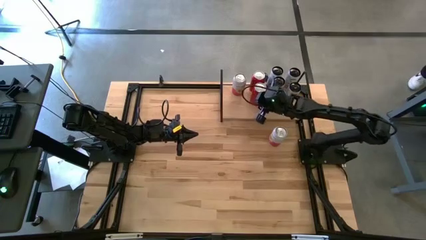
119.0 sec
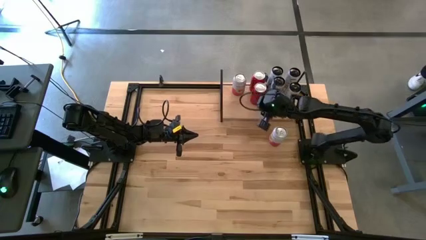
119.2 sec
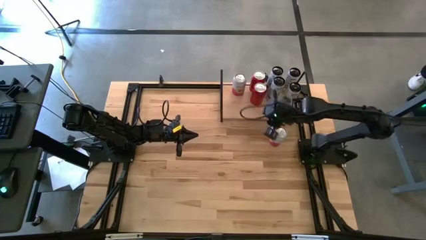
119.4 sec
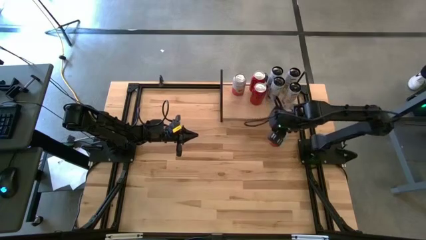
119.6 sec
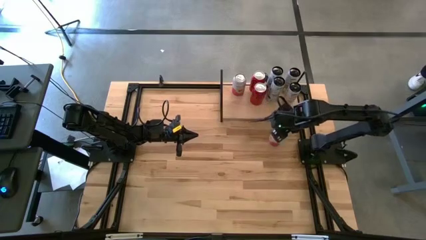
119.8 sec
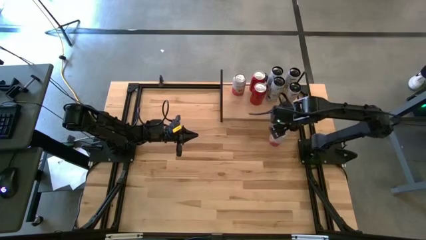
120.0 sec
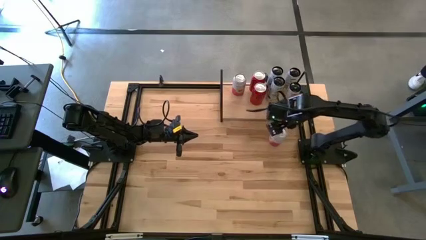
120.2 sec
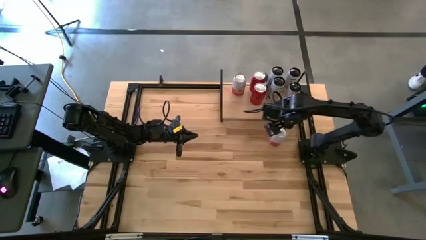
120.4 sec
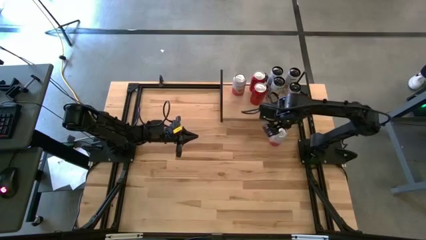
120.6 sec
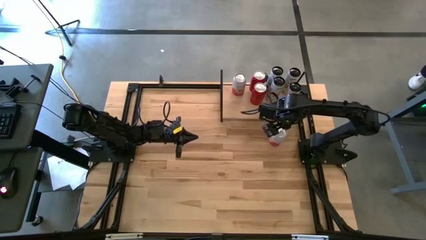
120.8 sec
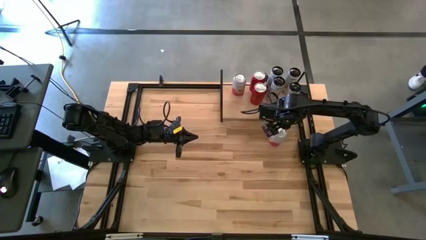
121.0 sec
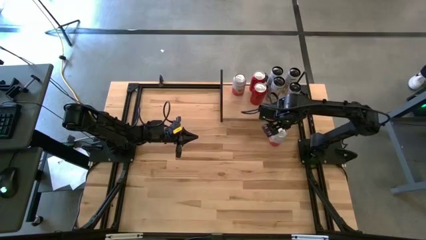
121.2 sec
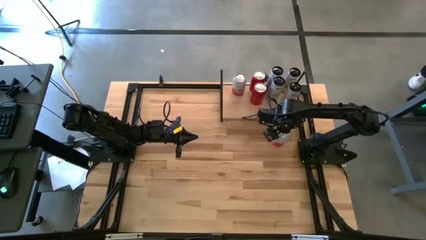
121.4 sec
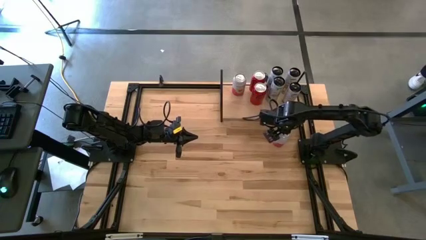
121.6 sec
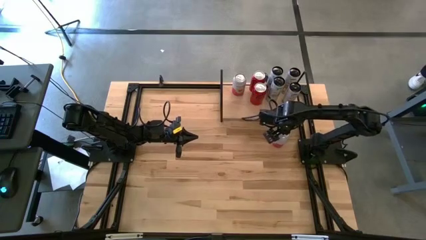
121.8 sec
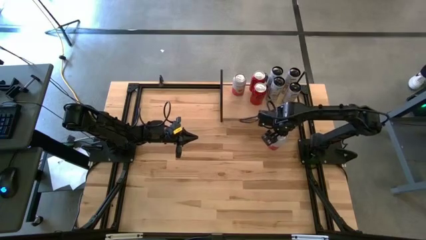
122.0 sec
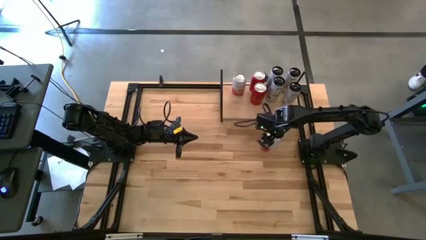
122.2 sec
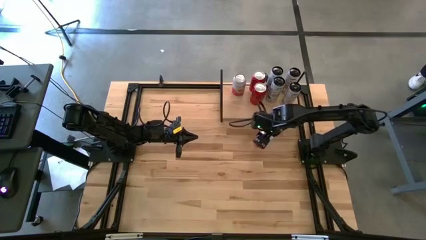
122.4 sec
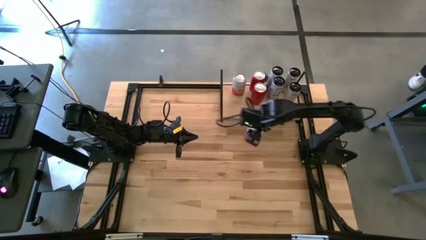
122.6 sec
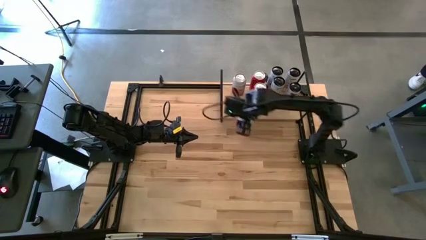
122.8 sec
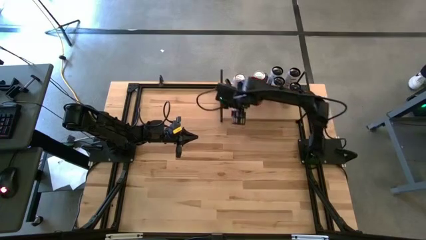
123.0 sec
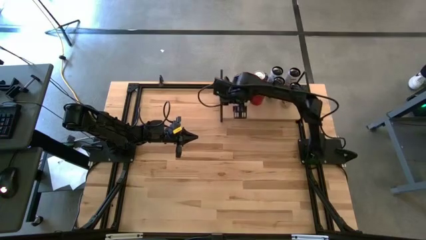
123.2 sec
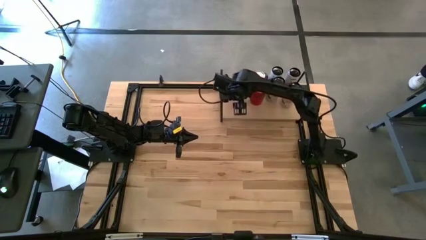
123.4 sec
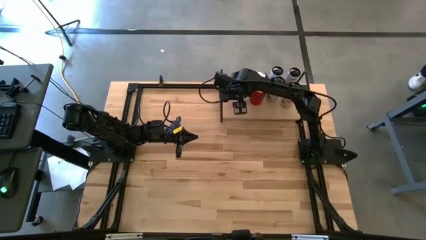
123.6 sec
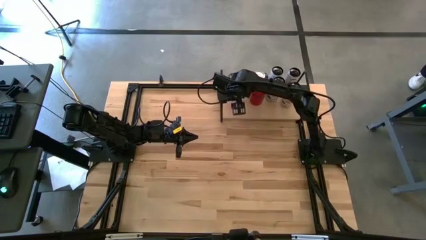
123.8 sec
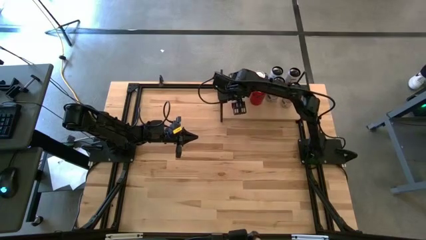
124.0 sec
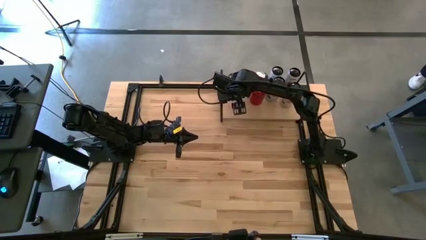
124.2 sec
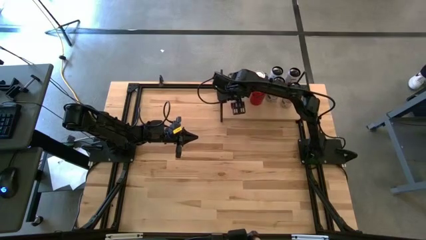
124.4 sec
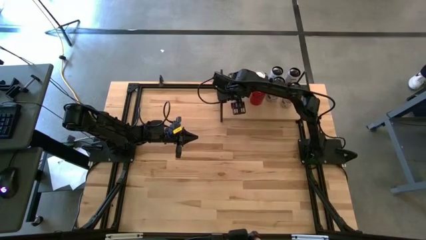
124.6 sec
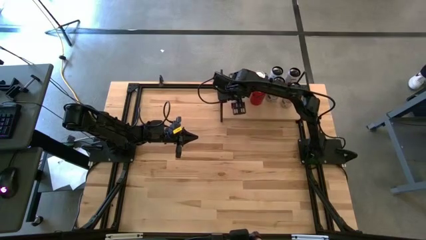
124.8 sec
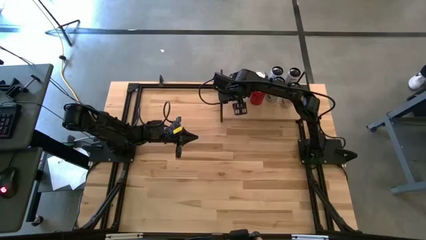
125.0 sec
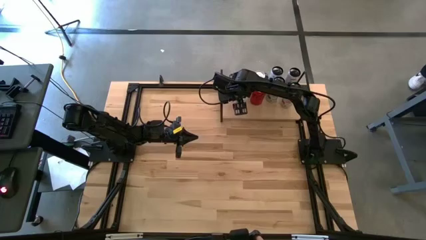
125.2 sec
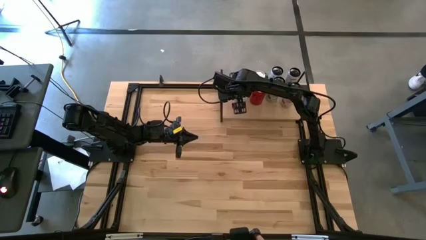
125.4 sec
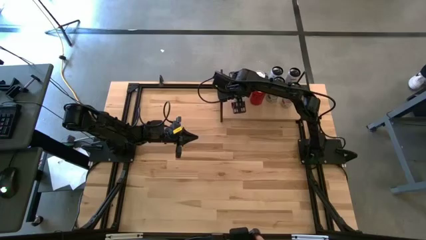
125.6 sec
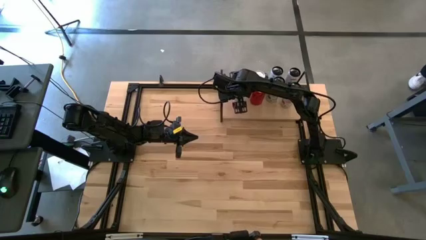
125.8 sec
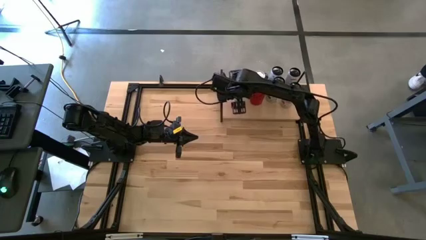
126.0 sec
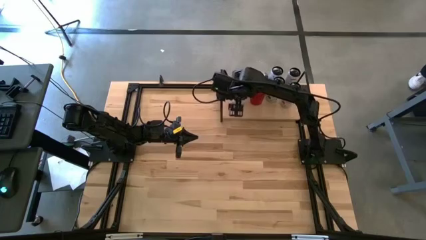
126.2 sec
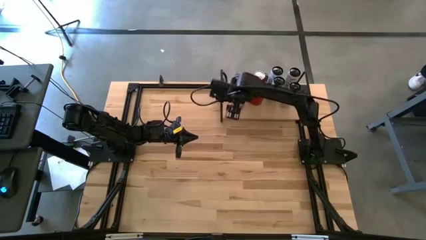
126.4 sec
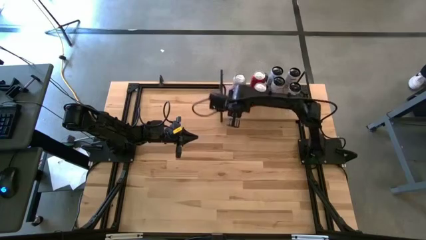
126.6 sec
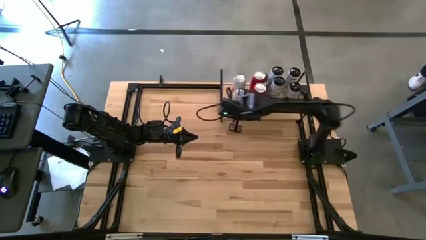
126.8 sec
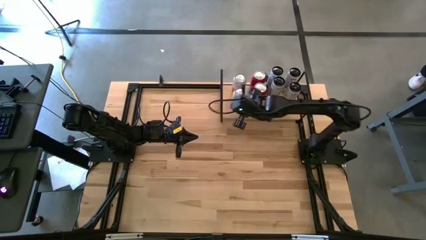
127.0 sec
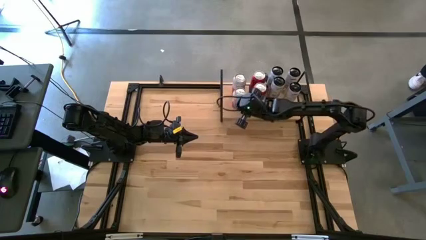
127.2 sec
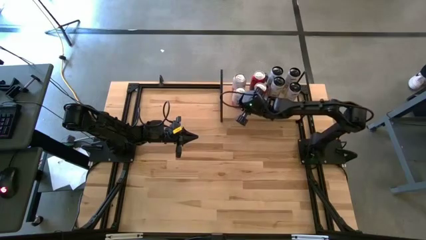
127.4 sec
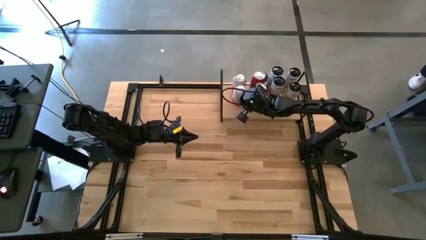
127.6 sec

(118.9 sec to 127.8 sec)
Task: Place canned beverage on shelf
Put the white and orange soda can on the shelf aligned with the other white and orange soda can

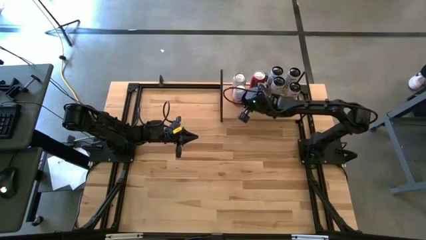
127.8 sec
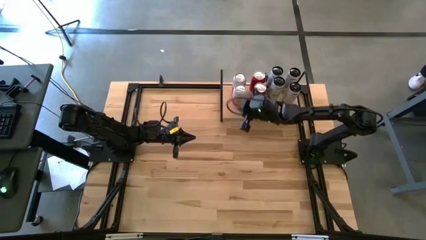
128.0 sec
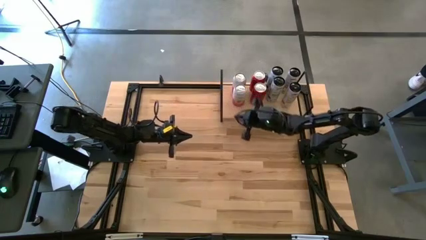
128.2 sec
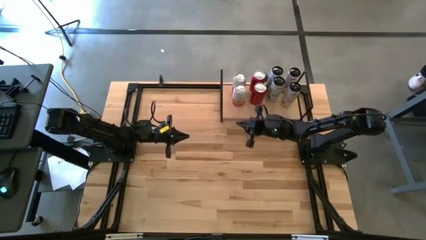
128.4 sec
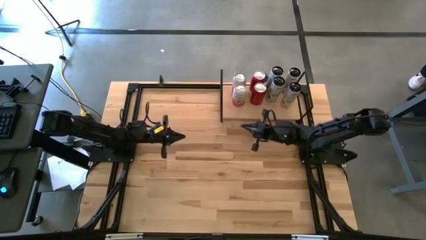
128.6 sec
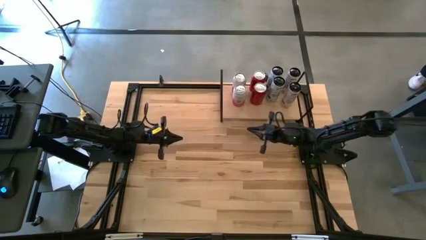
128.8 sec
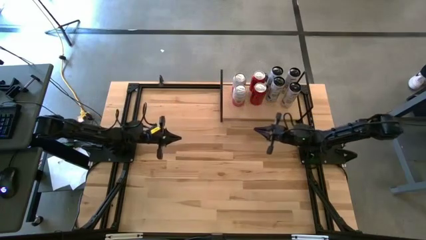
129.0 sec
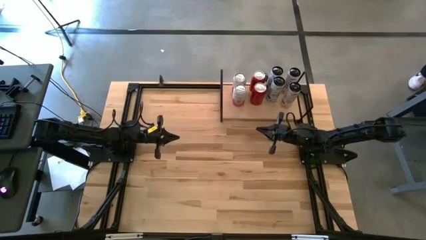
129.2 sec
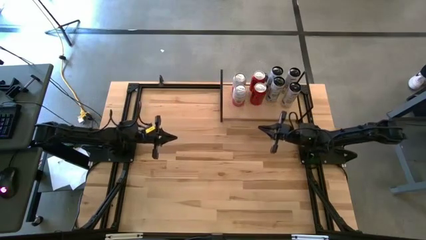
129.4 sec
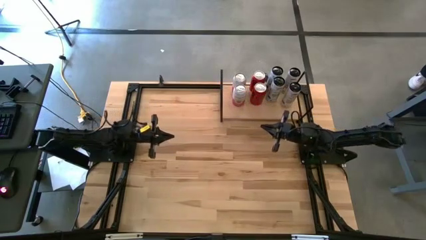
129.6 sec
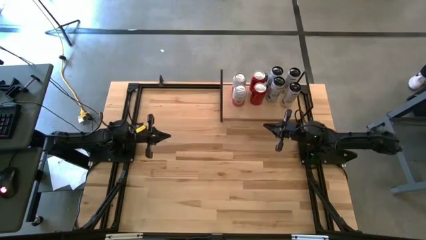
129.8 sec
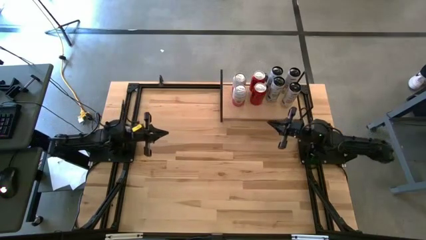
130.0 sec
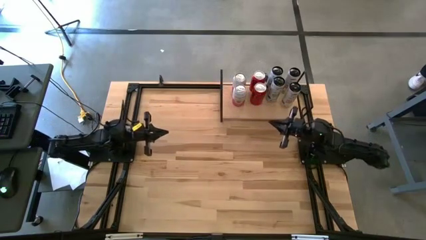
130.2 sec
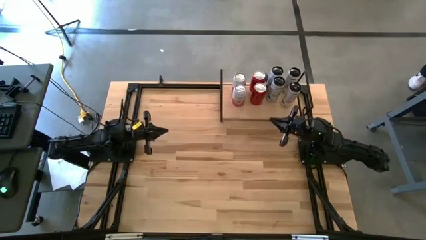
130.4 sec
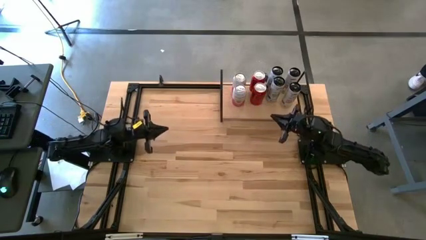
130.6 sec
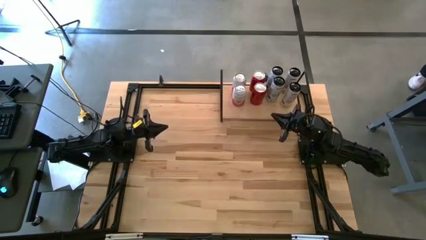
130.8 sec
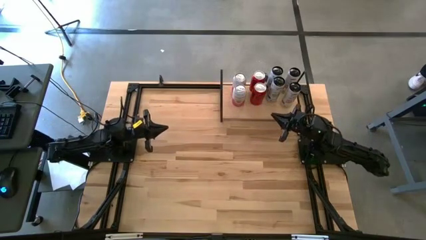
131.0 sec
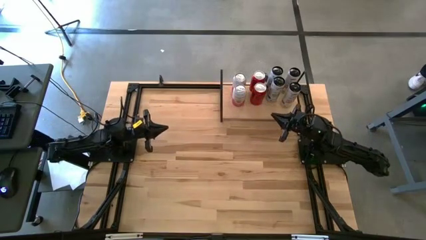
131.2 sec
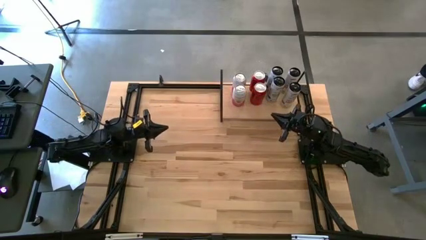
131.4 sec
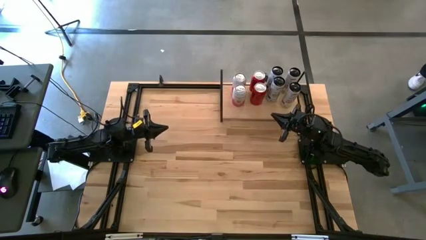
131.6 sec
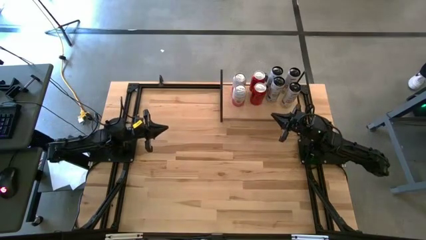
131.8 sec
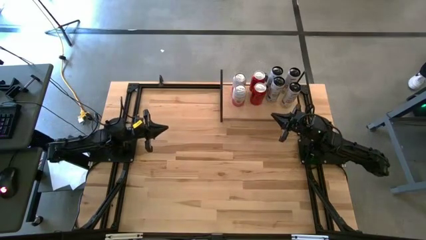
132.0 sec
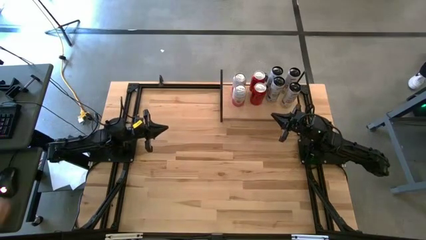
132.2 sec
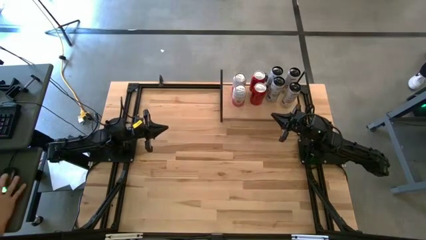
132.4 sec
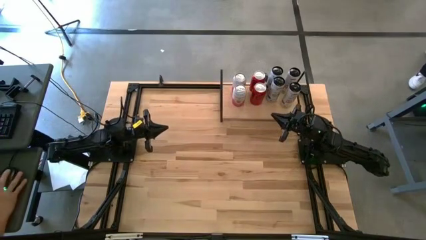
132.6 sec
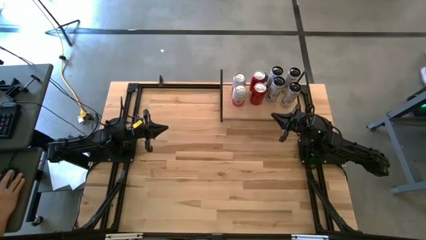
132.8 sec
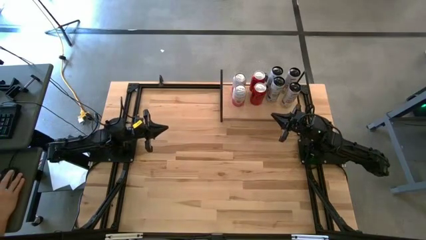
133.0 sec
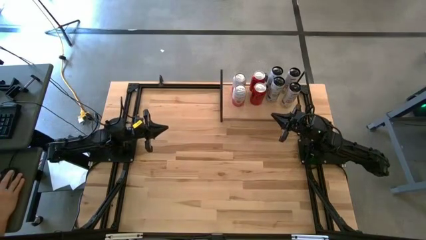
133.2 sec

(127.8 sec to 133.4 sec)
Return to Home Position

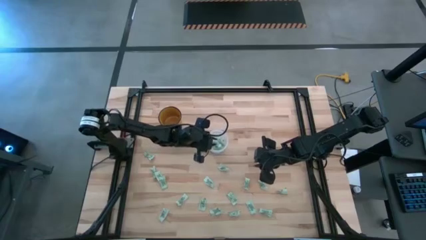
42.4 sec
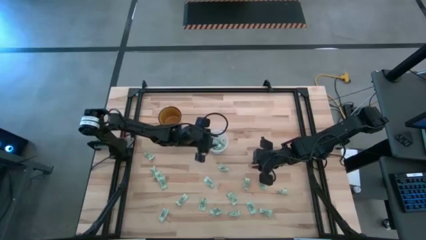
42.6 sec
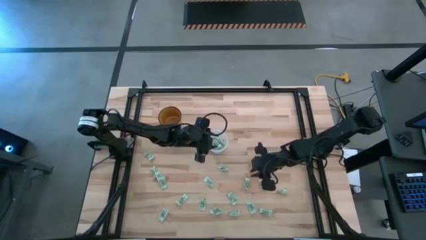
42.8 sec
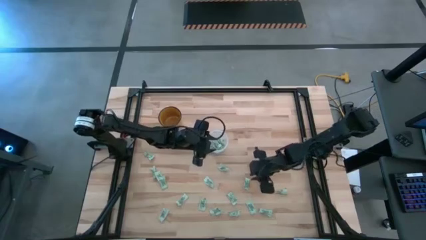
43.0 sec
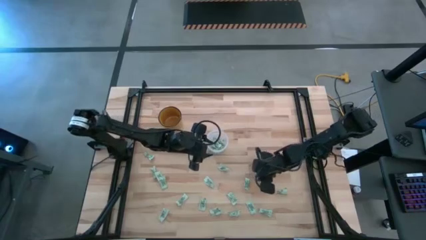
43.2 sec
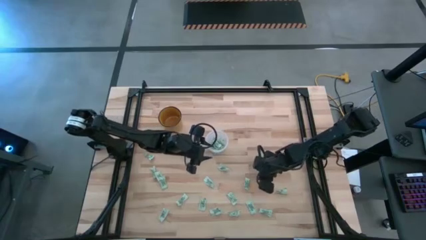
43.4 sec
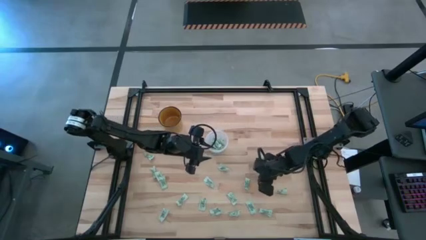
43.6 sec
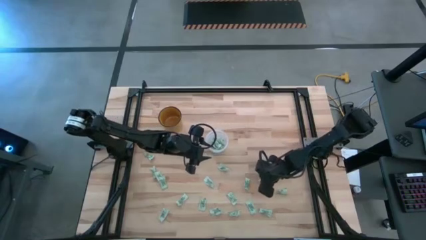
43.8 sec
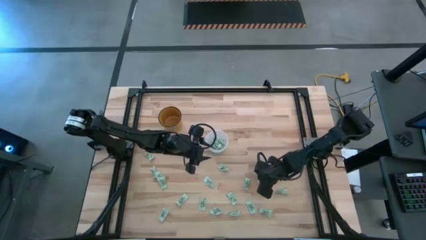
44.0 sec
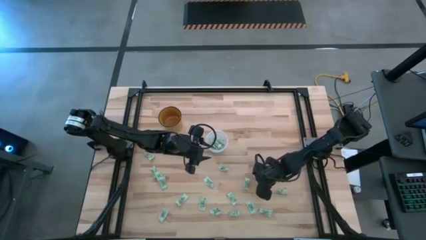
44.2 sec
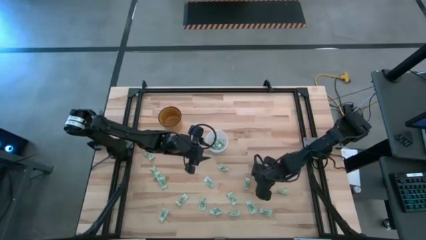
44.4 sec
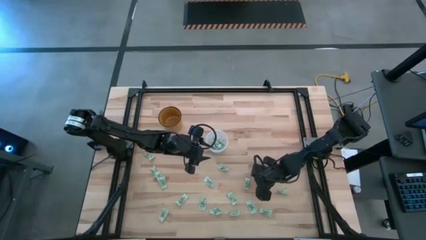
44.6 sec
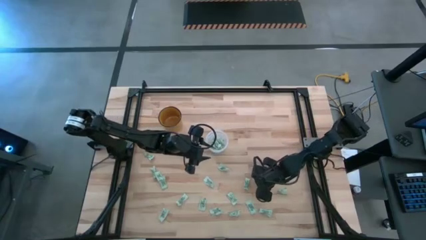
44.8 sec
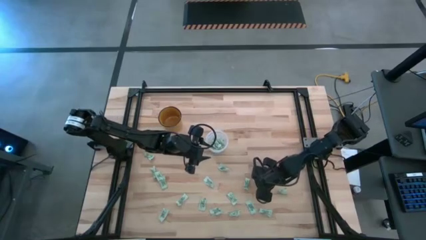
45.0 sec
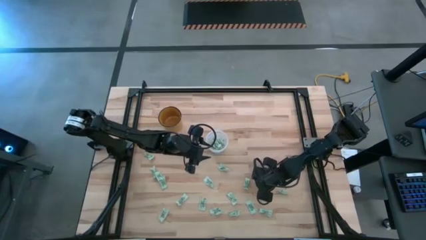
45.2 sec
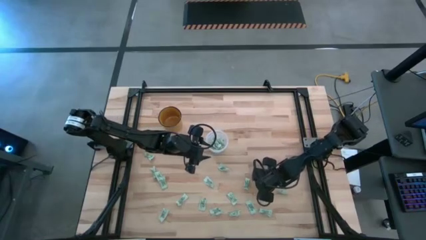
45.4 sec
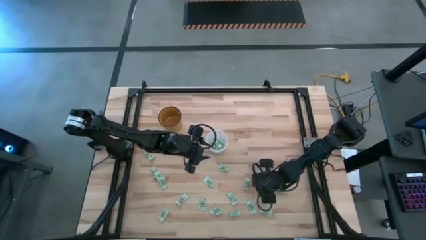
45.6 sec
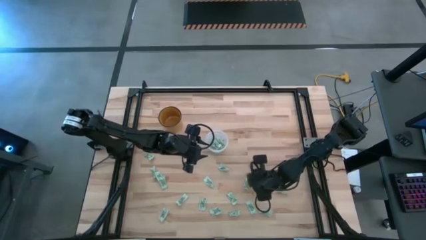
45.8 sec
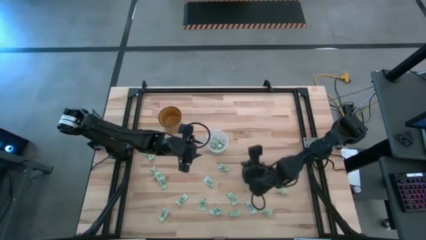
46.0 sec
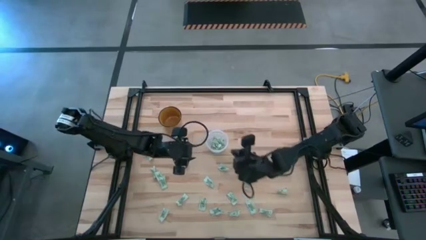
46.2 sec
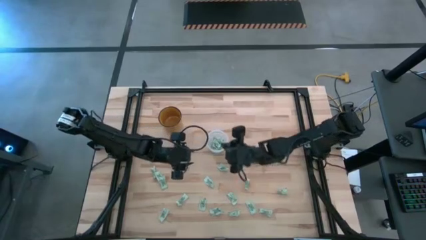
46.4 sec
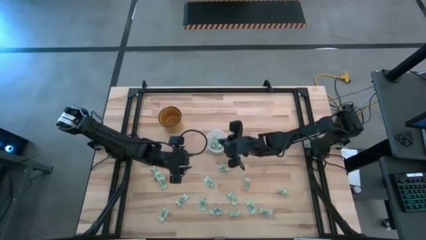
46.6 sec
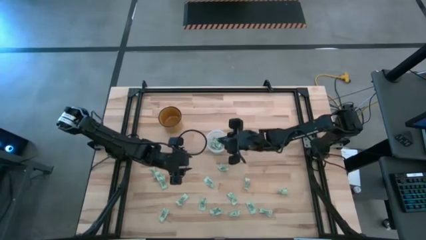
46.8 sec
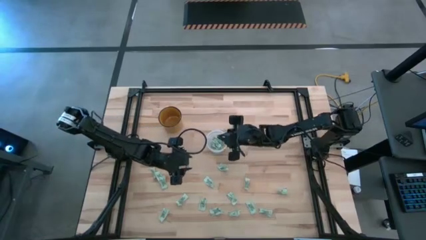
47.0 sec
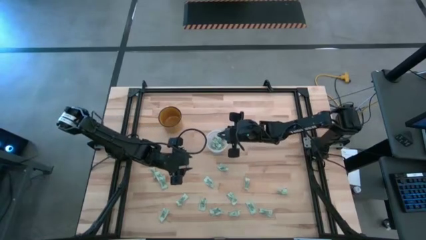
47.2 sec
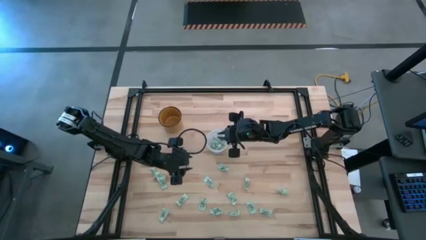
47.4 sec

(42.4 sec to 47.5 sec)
Task: Pick and place Stevia / Truvia into bins
Put the stevia packet into the transparent container
